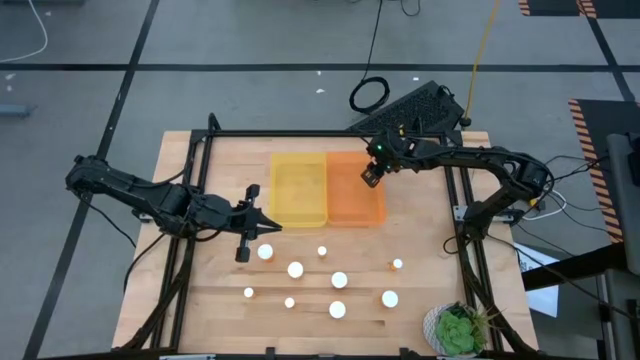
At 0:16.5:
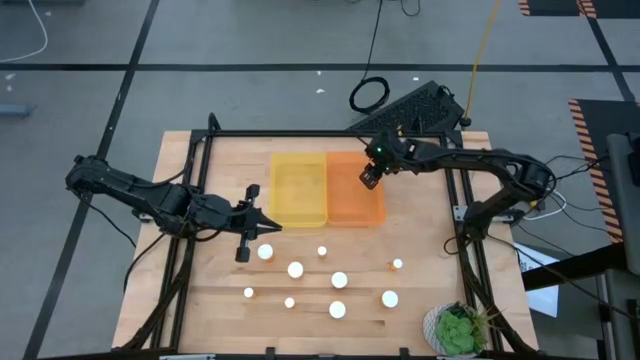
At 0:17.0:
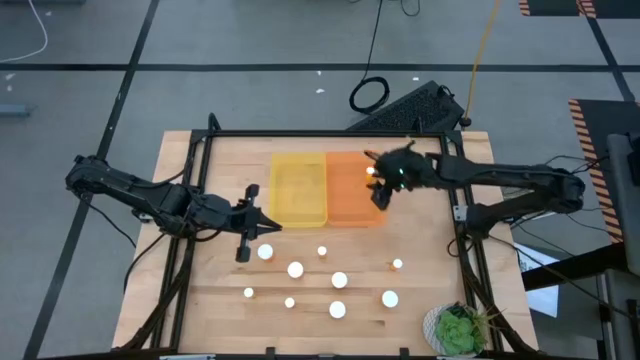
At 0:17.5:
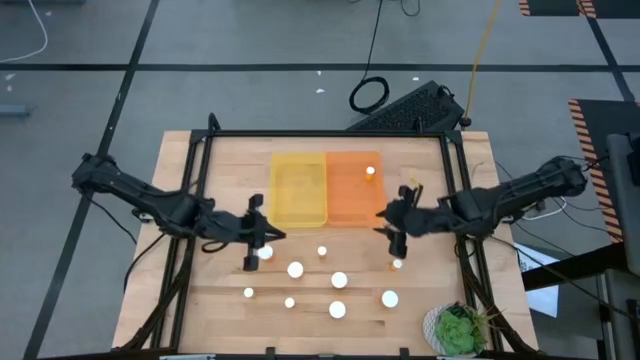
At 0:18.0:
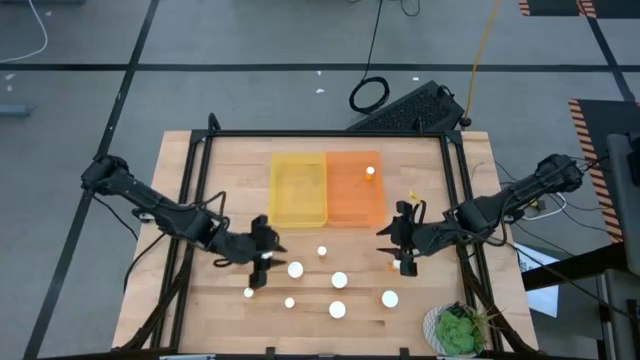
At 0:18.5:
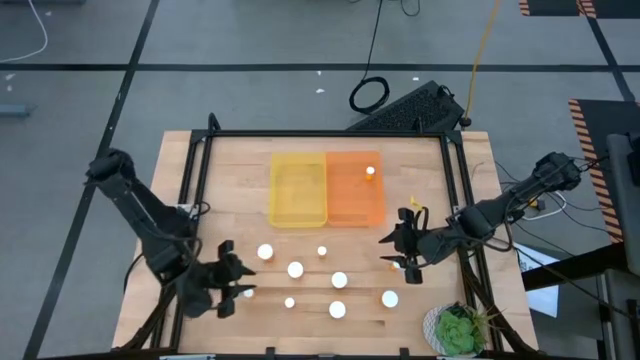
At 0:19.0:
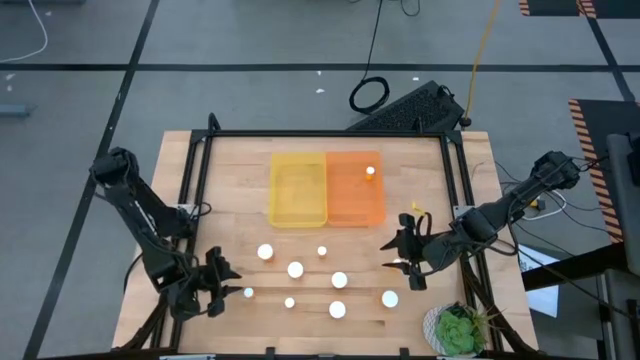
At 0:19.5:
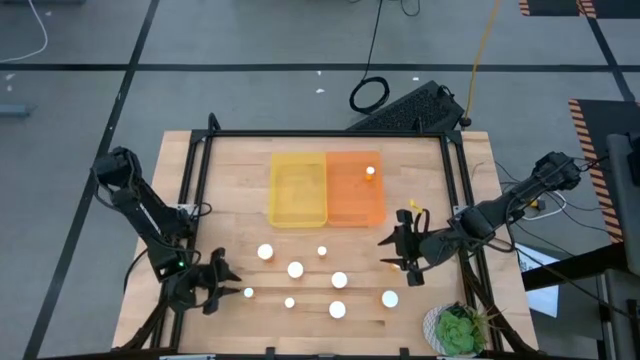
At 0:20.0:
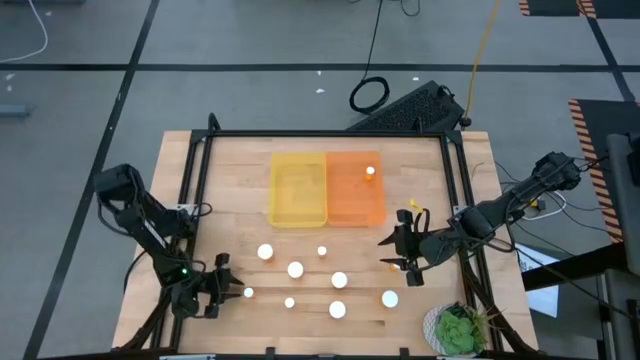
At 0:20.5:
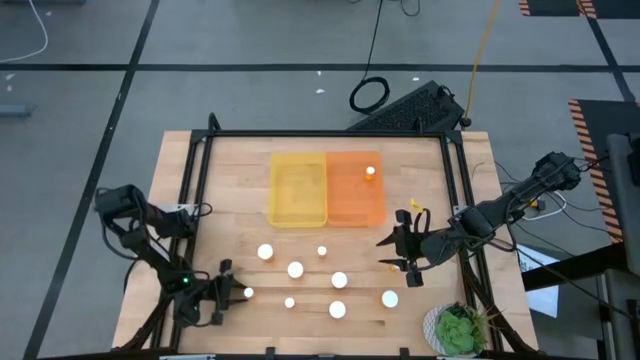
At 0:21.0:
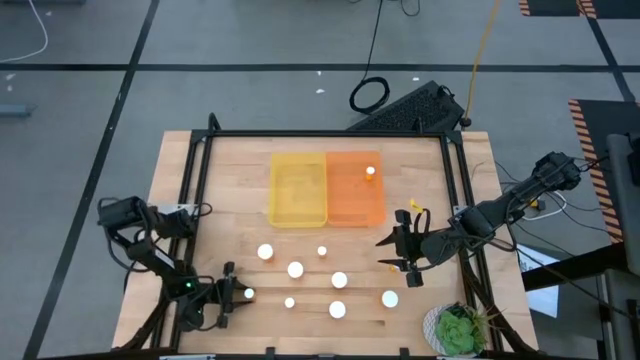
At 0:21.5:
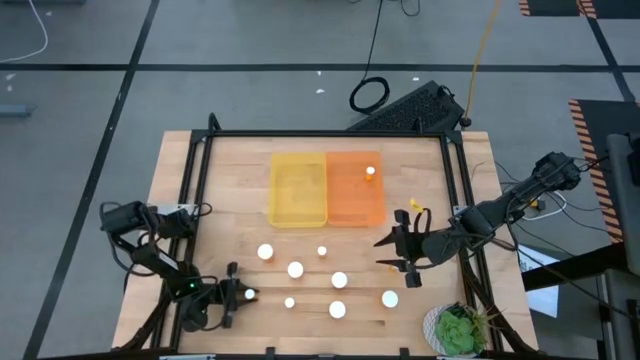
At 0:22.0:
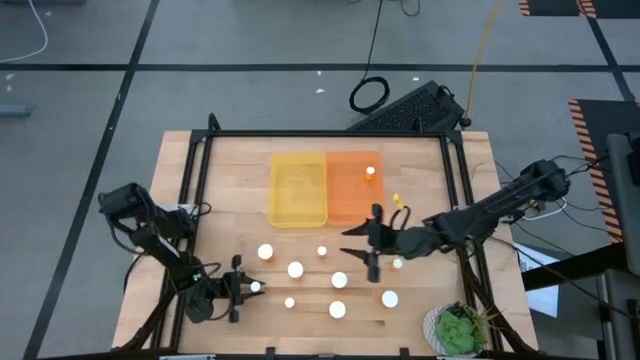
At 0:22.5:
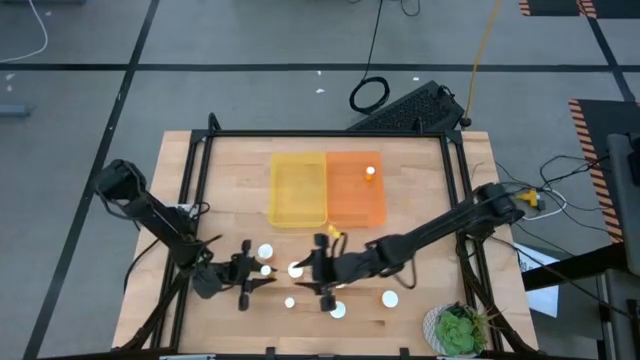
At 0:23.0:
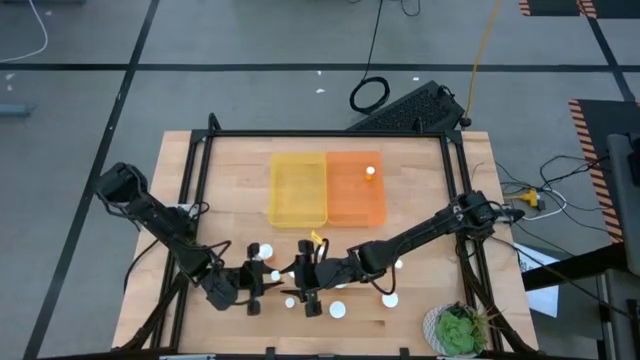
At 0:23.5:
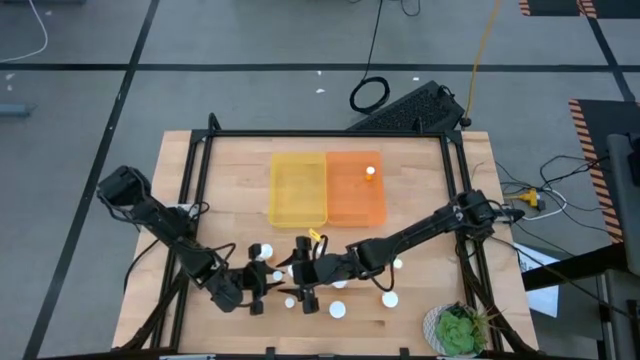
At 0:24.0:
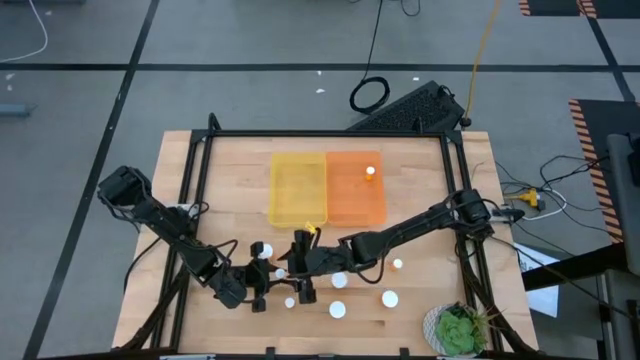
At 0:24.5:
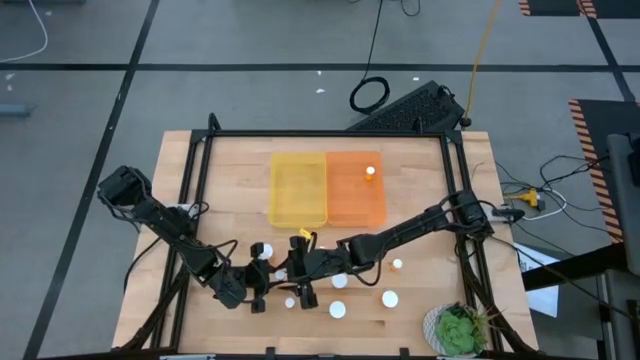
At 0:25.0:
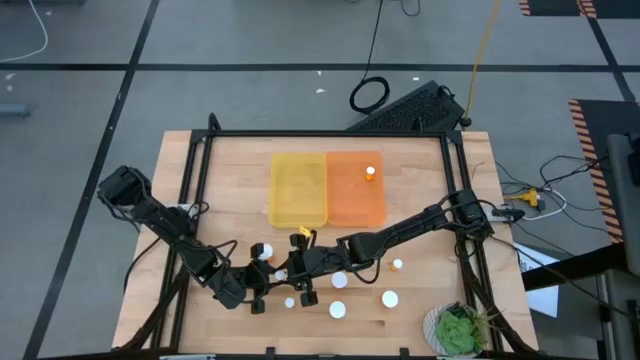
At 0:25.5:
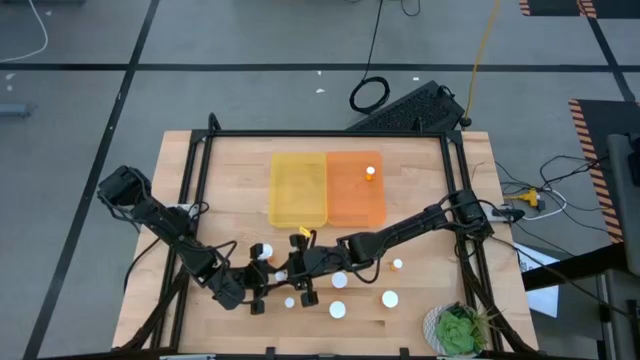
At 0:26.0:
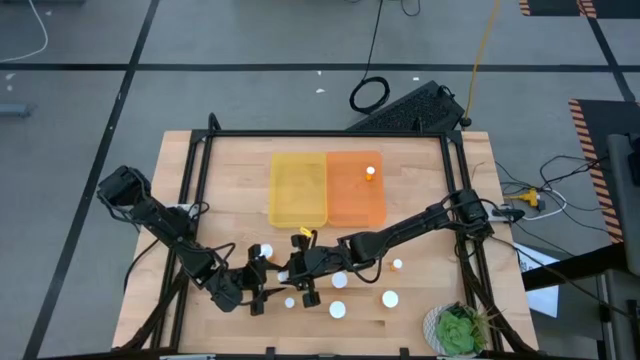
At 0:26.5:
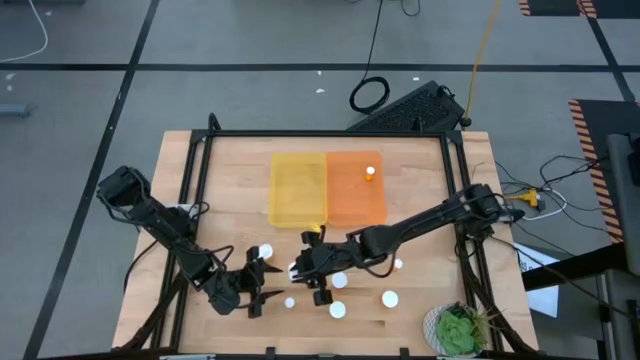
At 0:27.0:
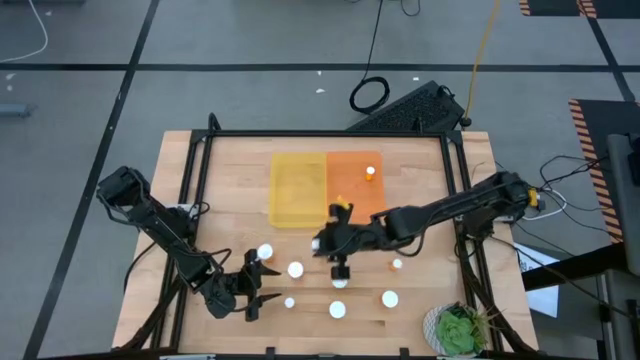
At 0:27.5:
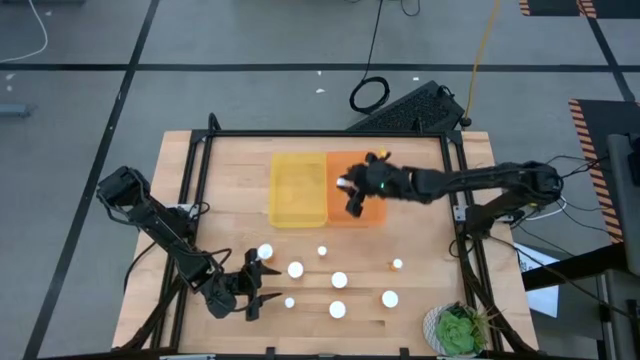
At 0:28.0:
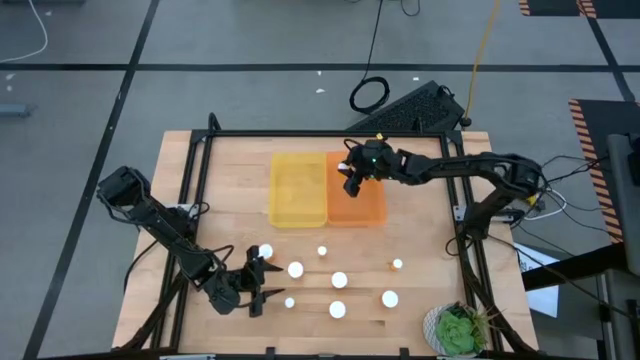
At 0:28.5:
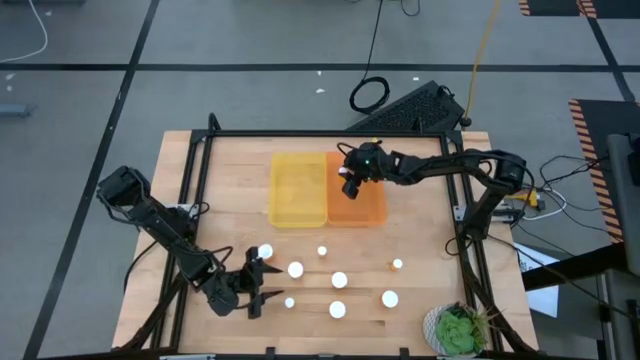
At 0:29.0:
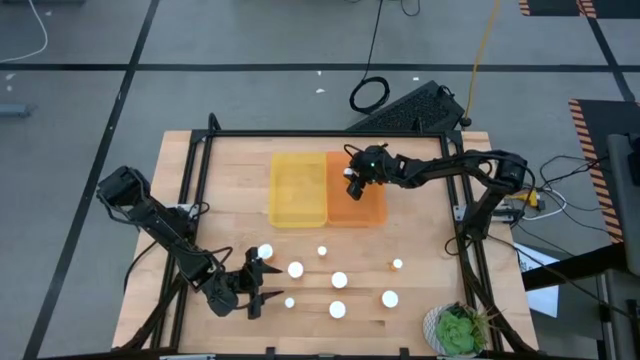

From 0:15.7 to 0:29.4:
Task: Pick and place medicine bottles into bin by pill shape (circle, oval)
Put the small orange pill bottle into the orange bin

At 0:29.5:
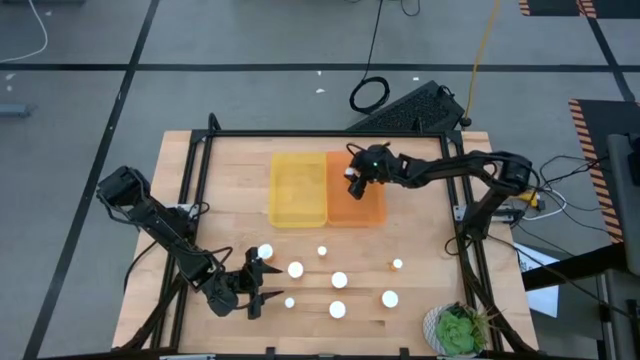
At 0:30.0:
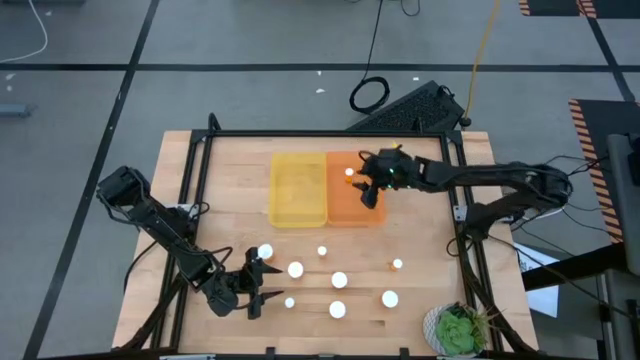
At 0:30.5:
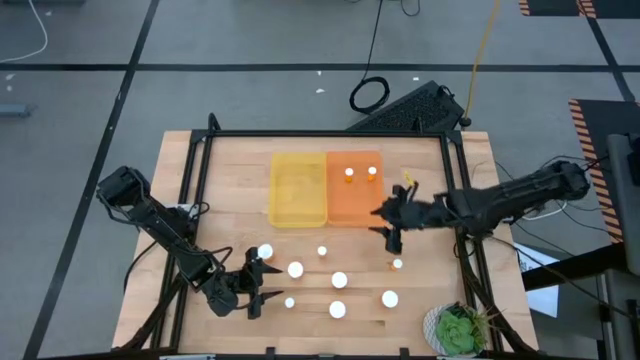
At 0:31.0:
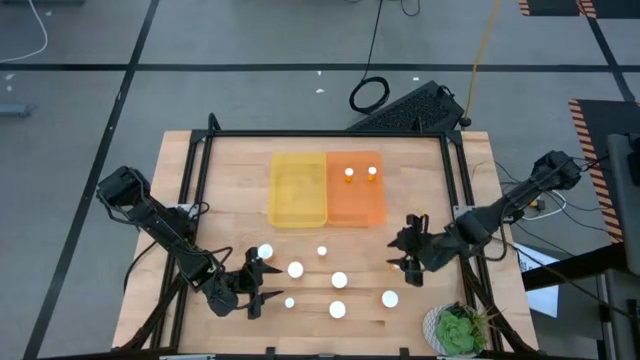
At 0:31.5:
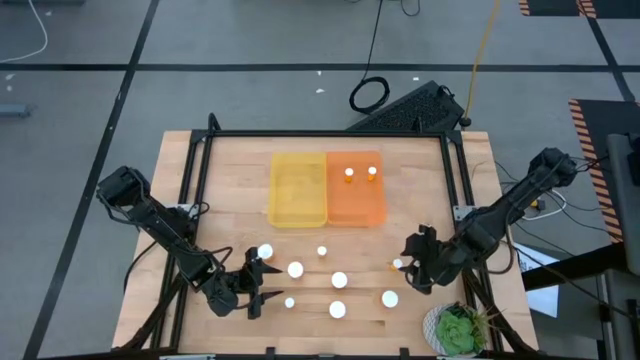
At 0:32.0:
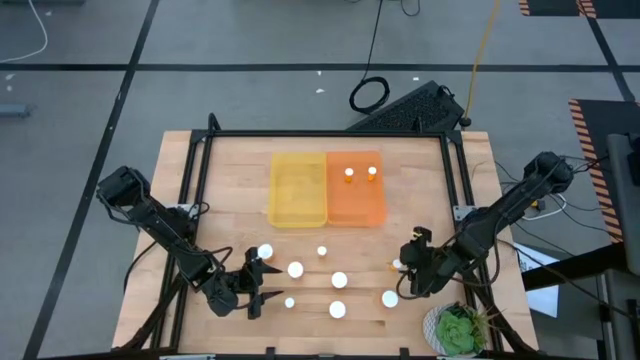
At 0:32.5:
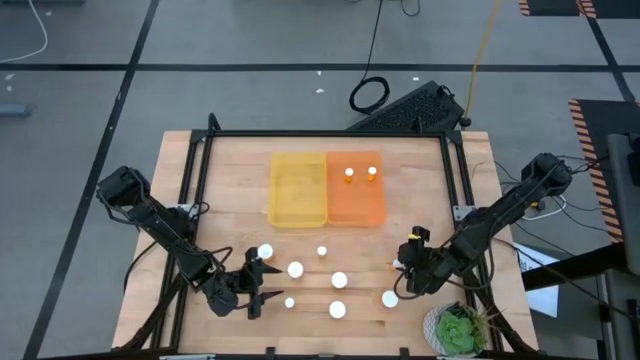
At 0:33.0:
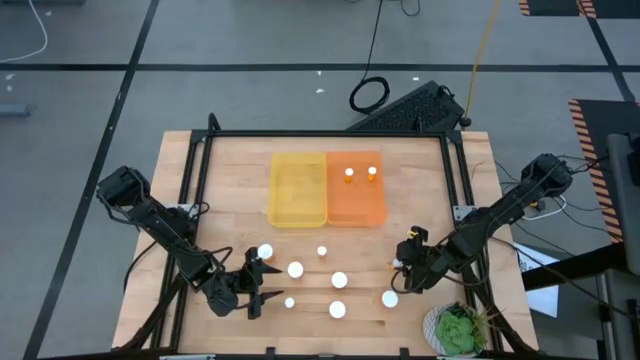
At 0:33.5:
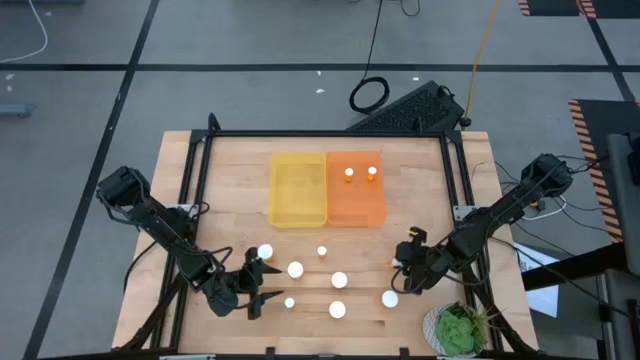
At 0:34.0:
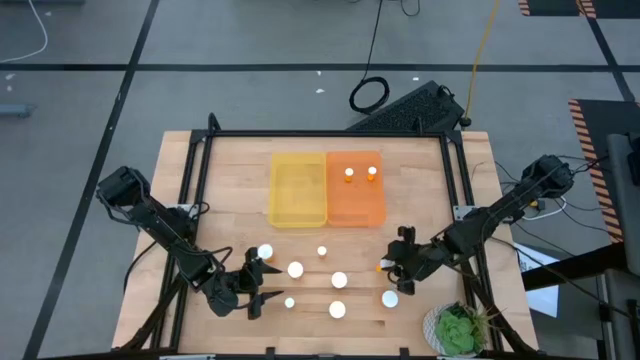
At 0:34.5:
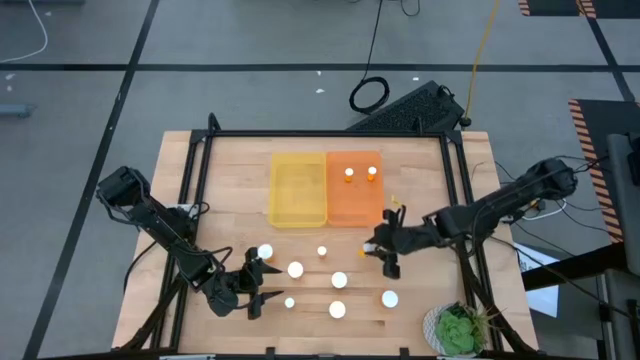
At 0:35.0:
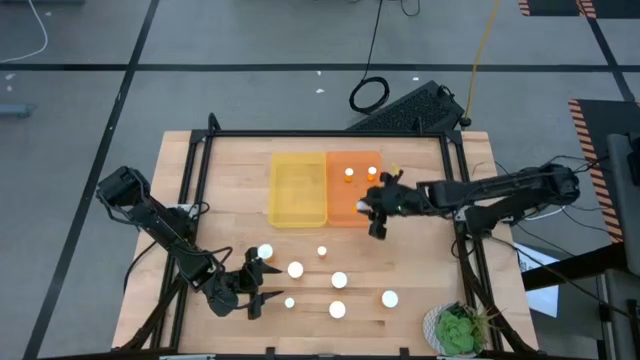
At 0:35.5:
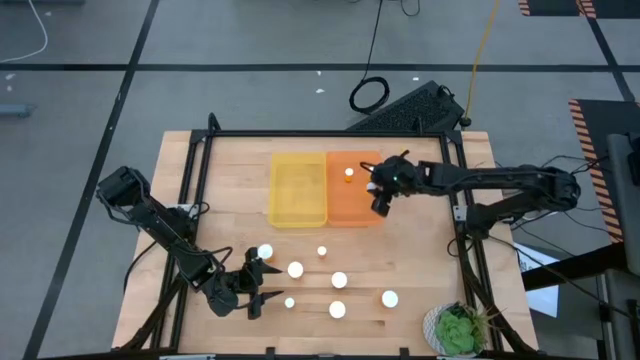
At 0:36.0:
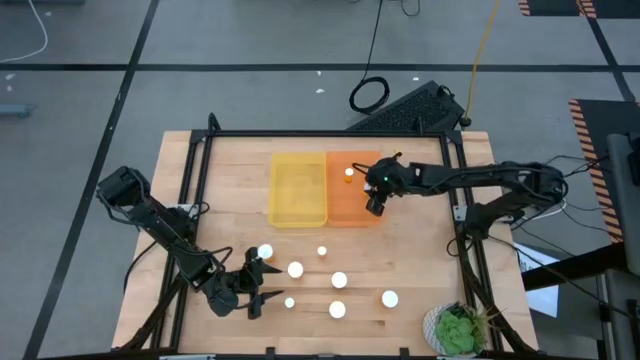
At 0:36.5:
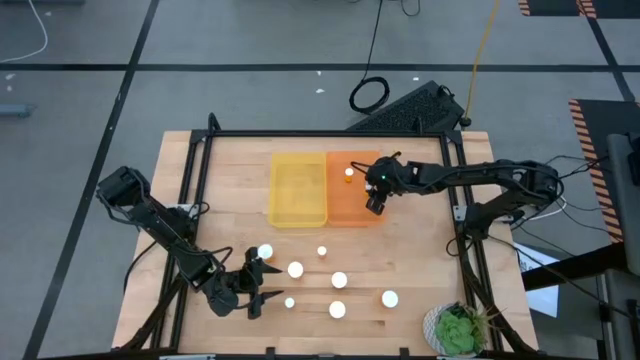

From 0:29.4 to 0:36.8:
Put the small orange pill bottle into the orange bin
